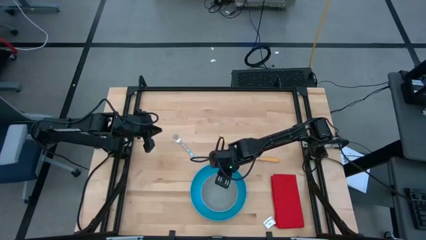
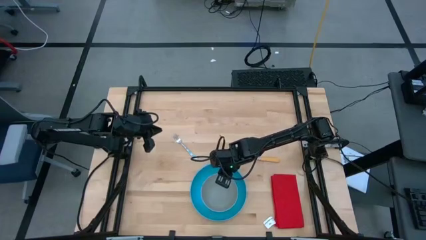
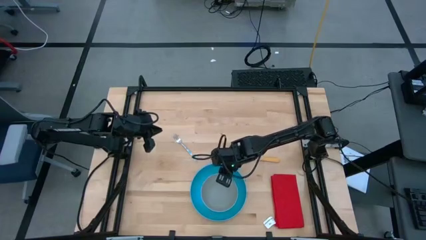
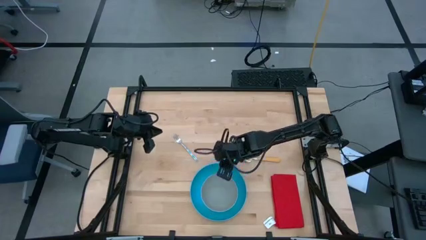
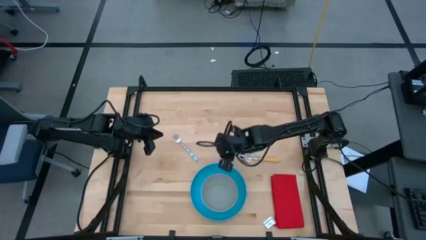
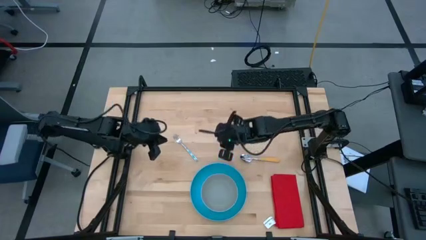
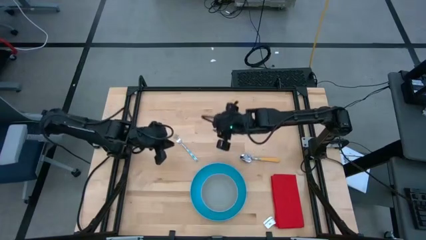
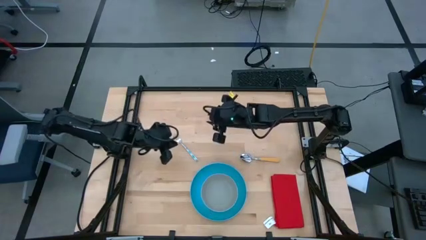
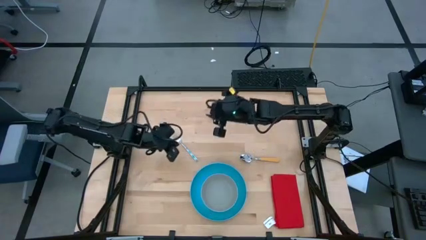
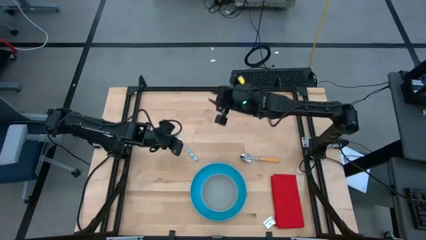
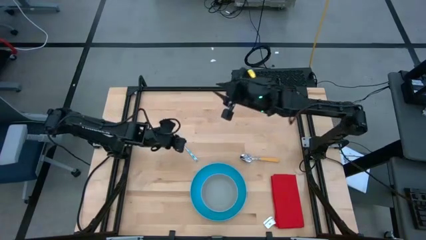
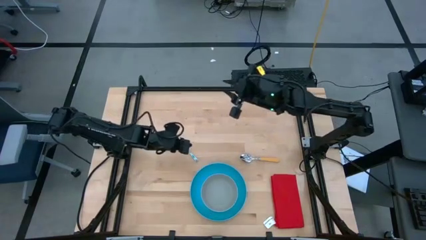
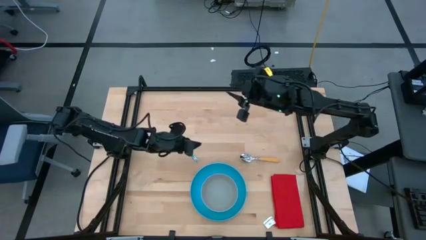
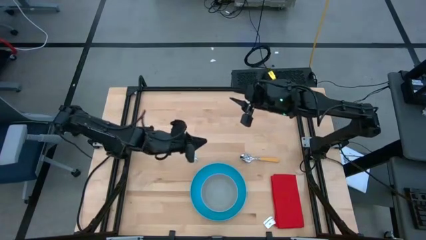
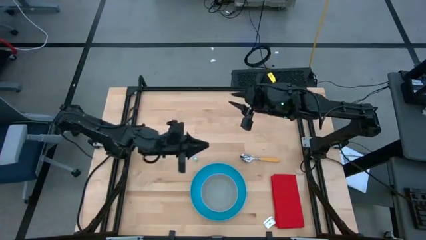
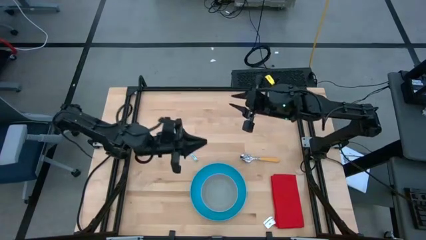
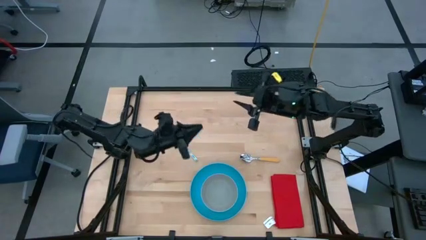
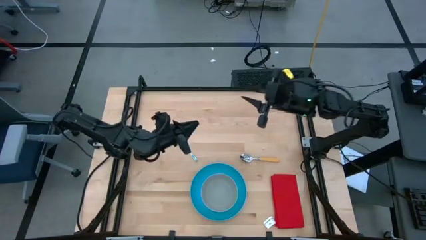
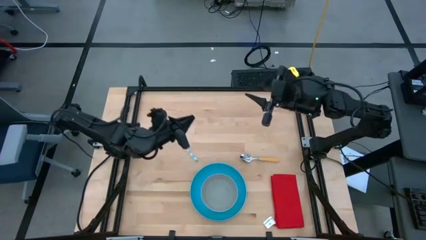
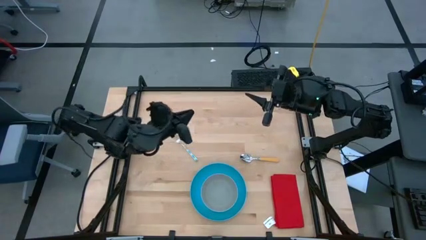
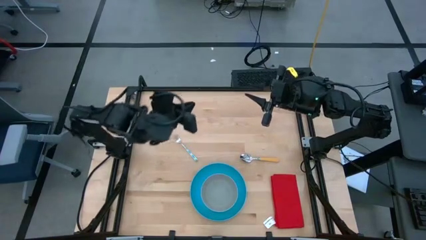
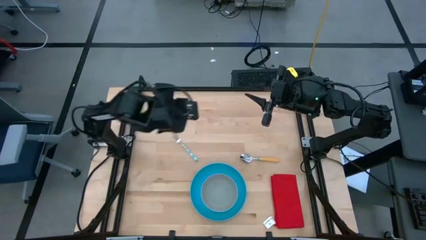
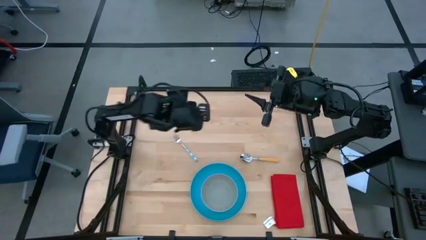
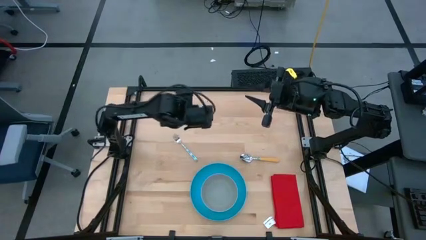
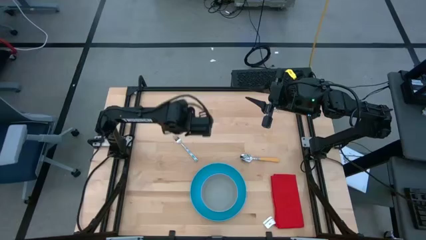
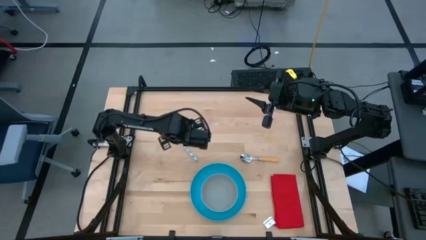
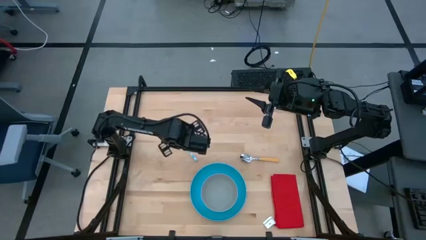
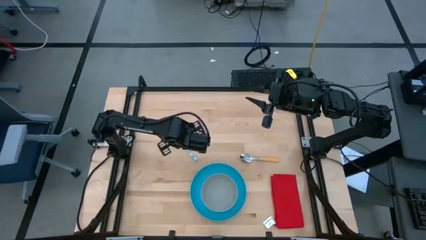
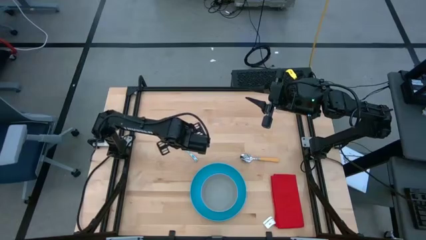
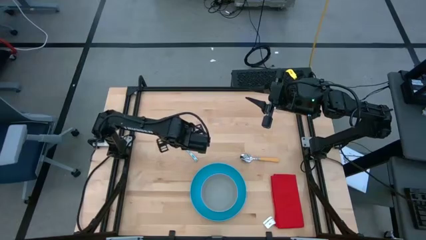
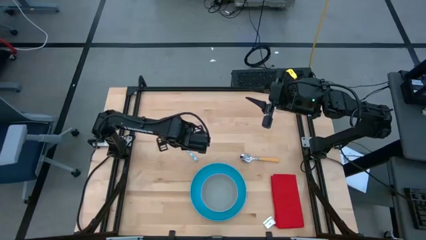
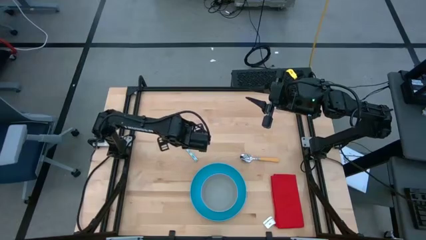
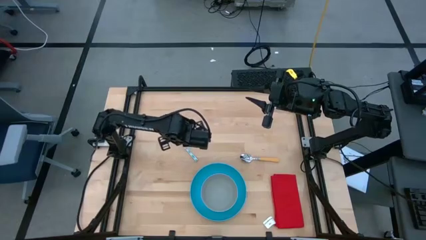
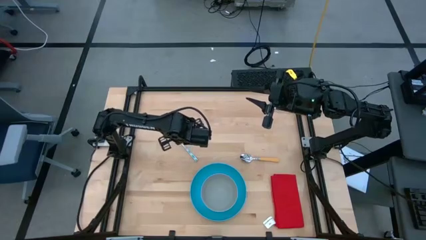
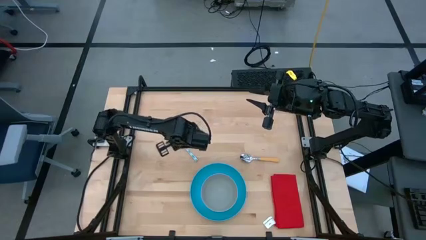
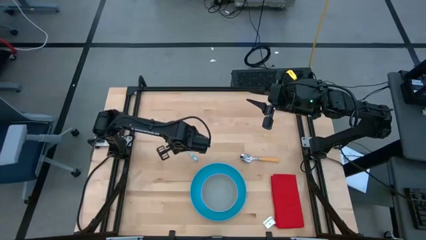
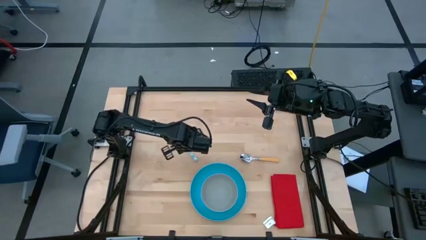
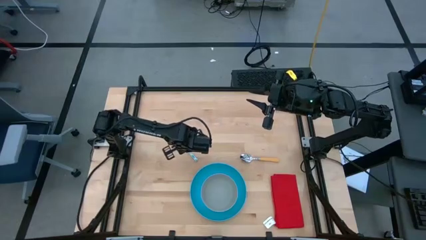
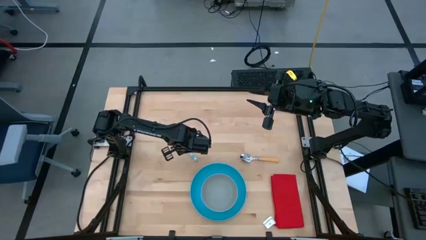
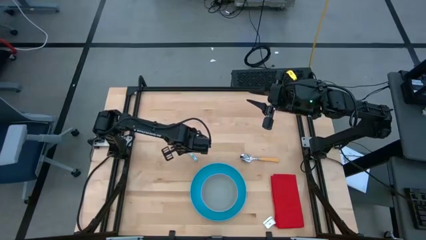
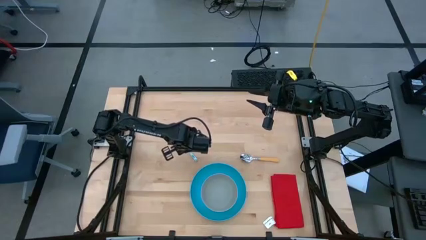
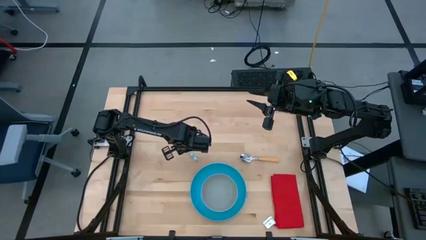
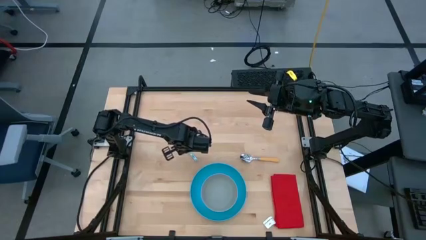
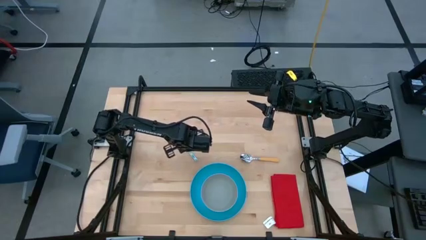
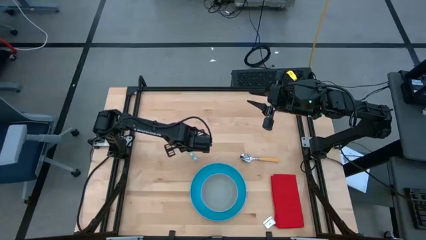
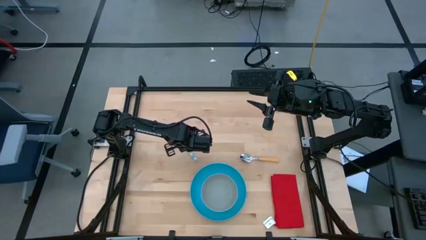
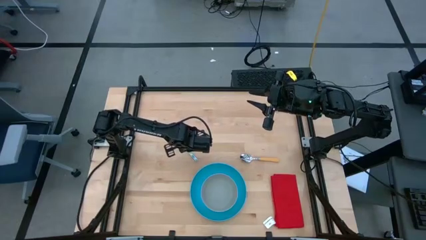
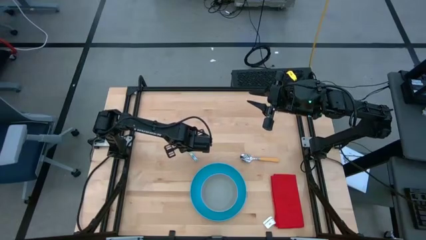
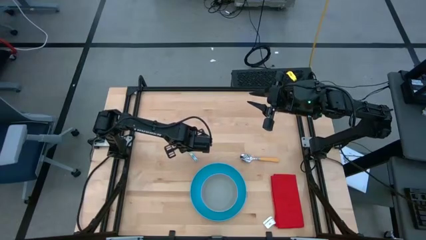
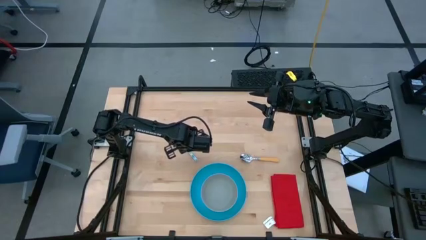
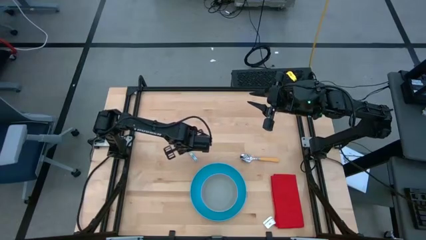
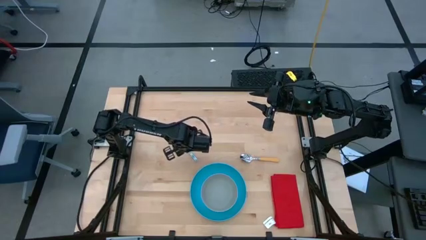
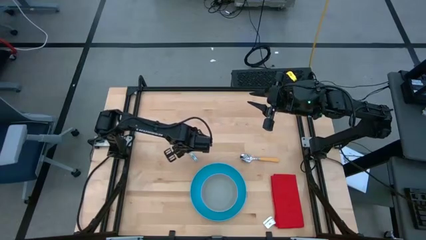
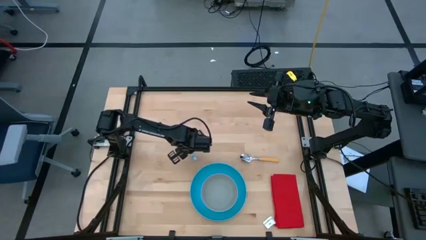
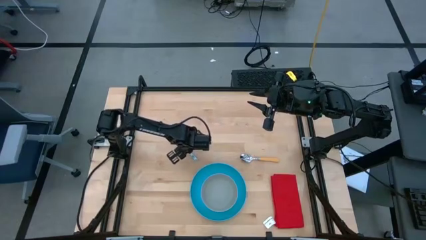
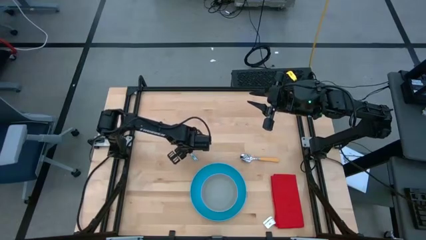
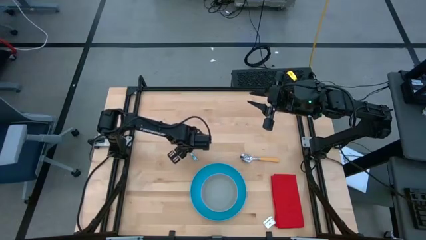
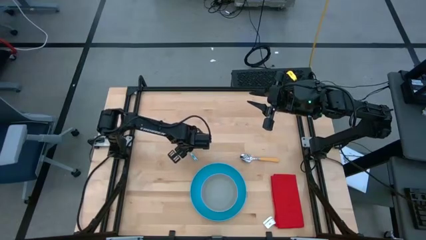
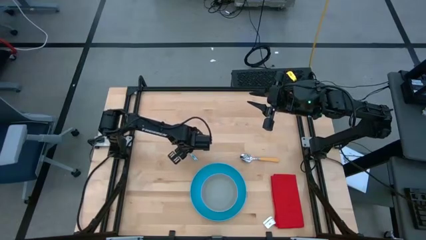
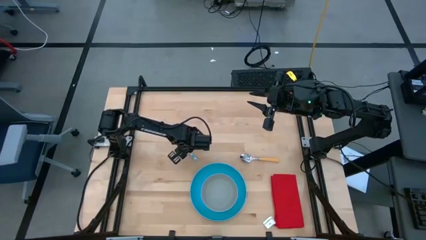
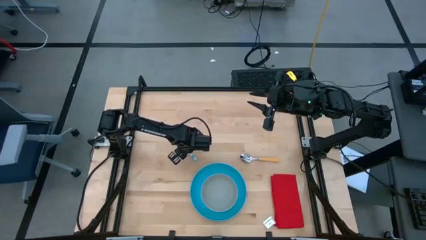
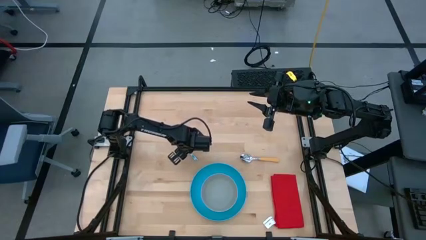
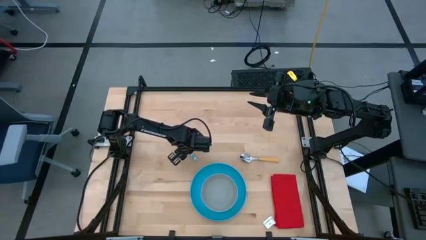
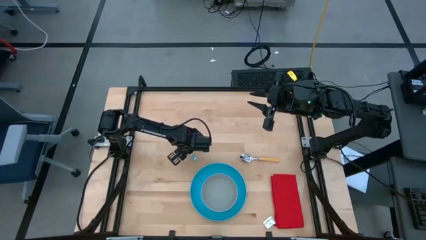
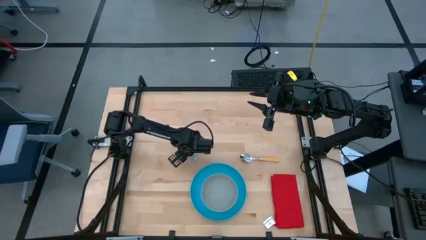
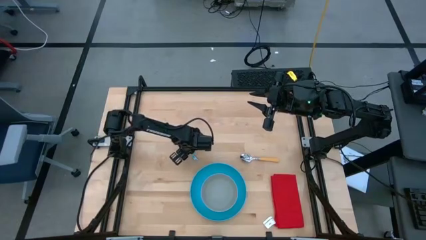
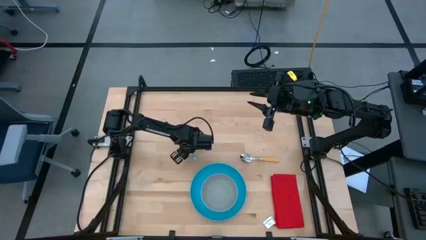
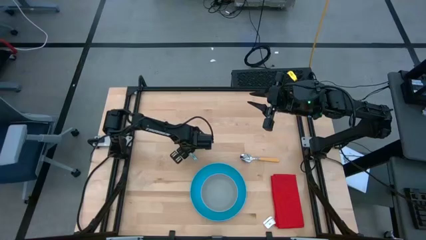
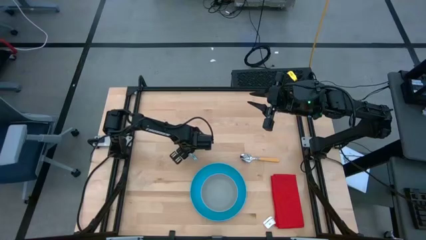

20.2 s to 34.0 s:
Task: Pick and place plate/cup/fork/spoon on tray
Put the blue fork beside the blue plate

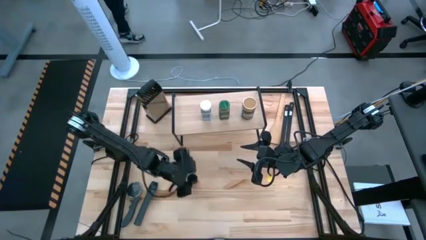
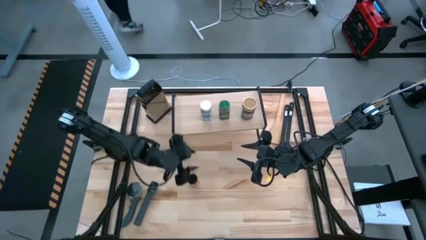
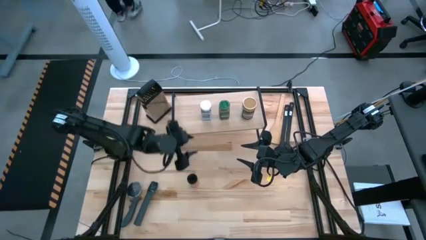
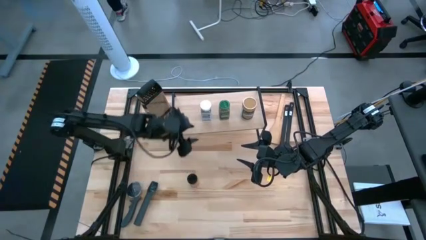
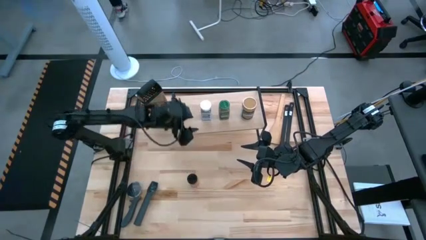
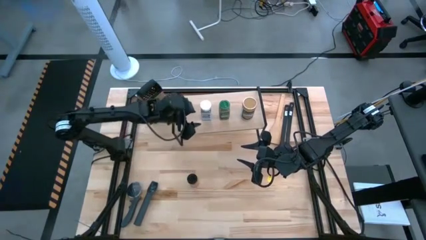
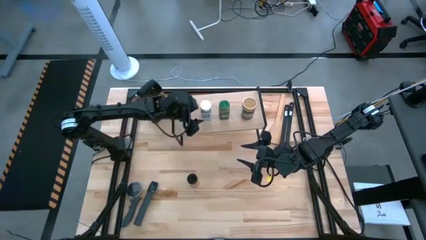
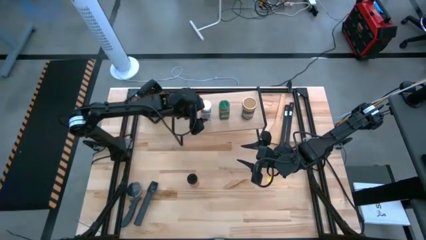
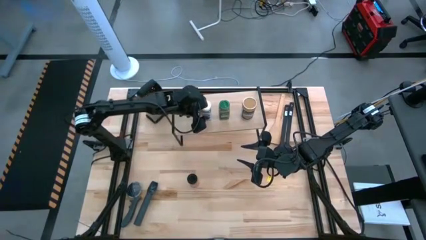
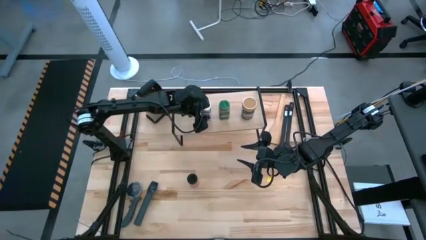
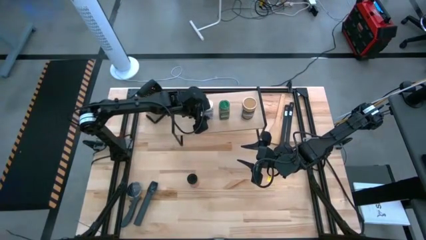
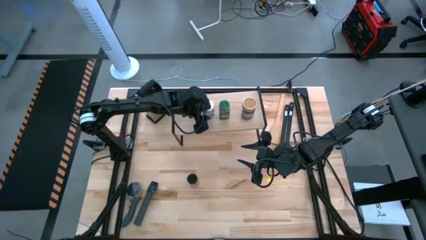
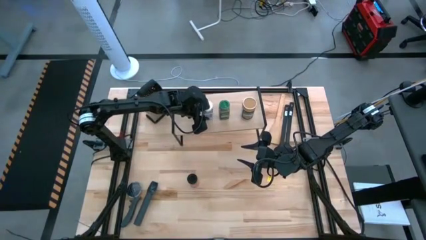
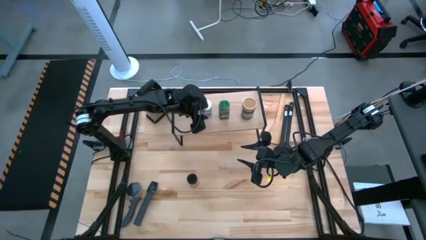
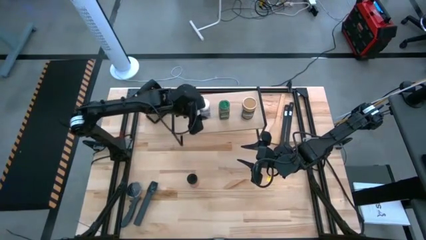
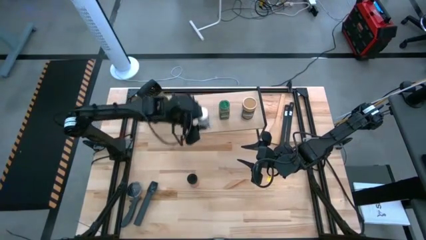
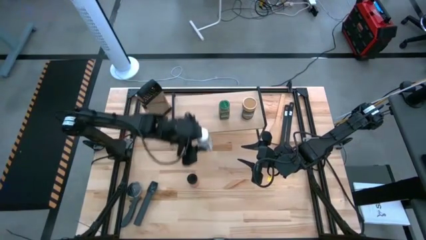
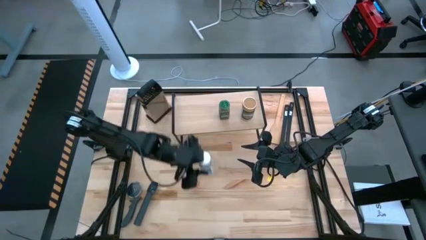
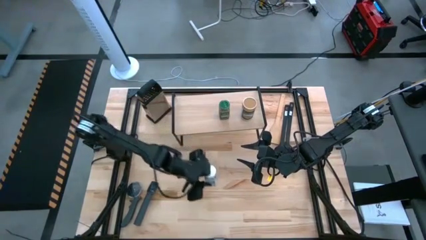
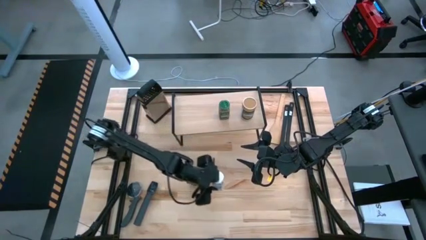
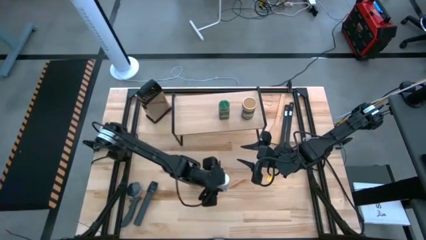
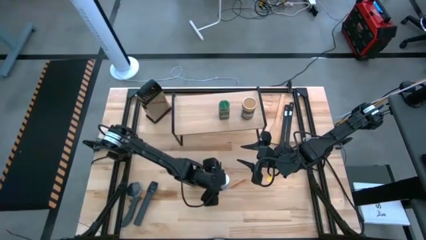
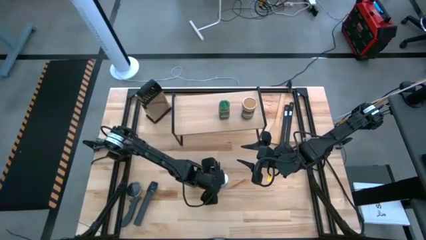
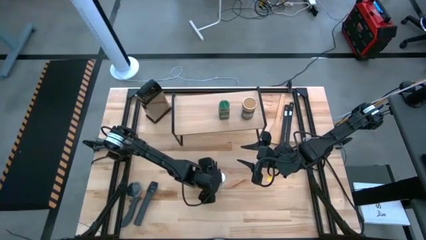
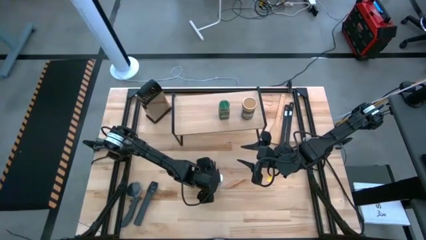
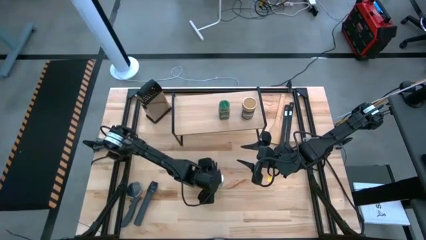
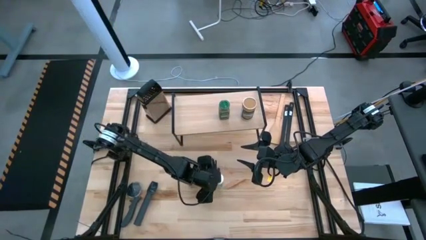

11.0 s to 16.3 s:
Task: Shelf spices
Remove the white seasoning bottle from the shelf
